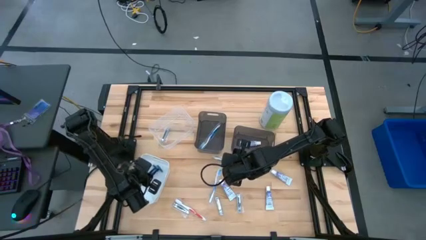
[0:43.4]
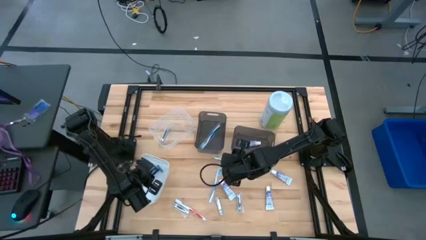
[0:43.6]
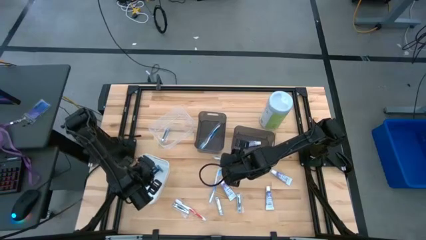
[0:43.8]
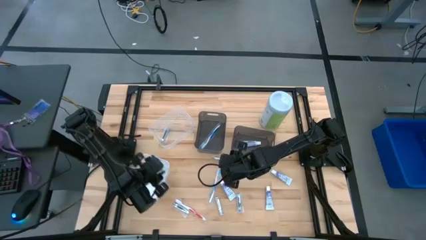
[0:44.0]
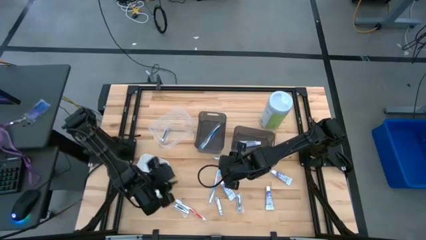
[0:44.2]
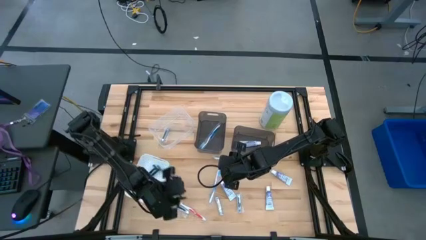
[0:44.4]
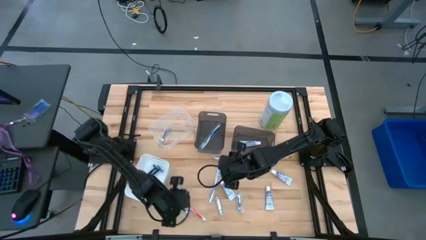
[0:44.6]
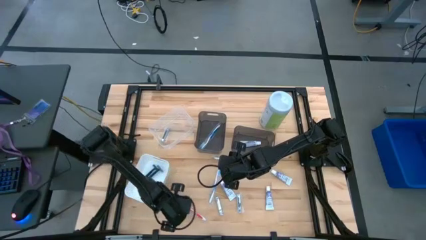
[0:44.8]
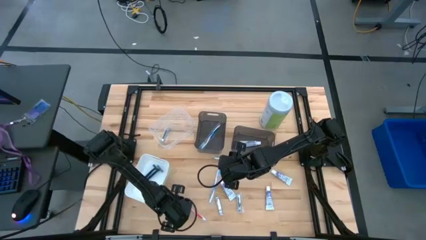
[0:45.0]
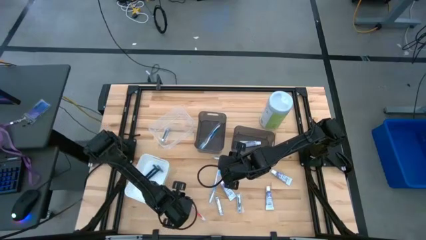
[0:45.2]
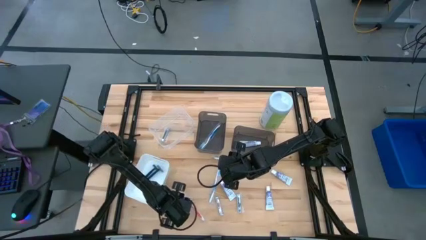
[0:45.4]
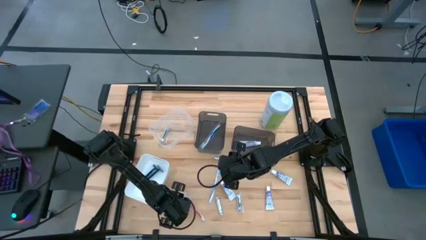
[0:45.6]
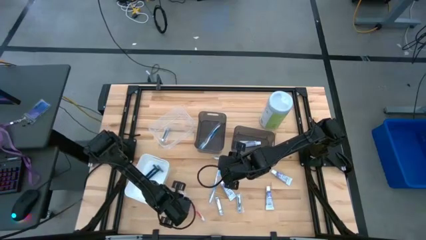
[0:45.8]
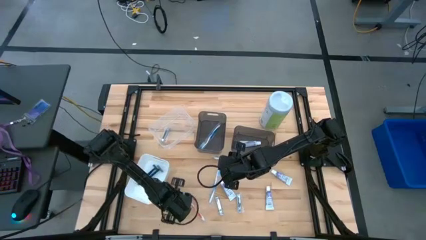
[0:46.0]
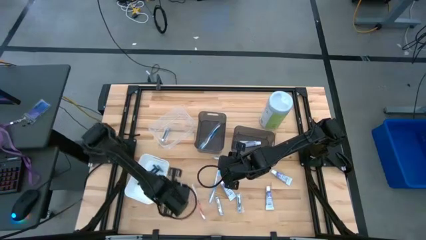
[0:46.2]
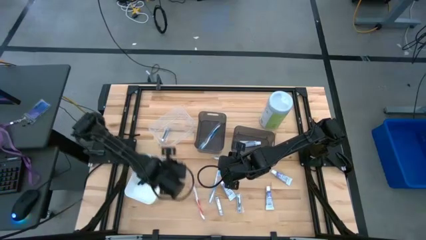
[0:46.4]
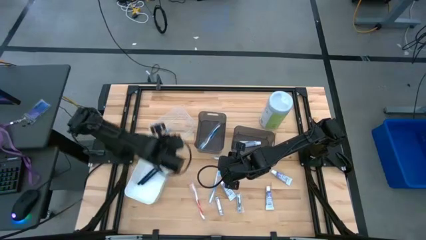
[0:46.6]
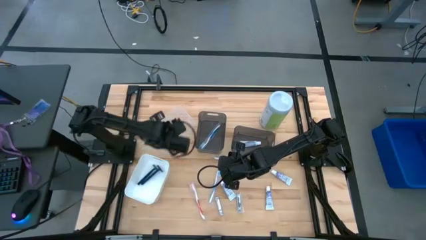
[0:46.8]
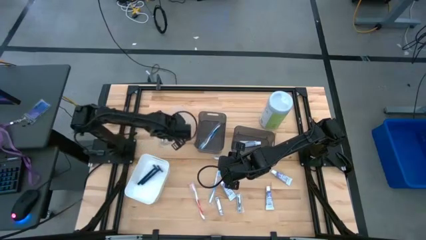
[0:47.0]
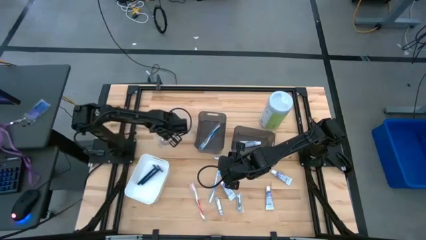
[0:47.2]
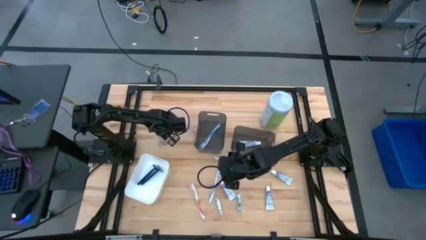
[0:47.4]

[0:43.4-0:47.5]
Task: Pick & Place Travel size toiletries
Put the silver nail cutter into the transparent bin

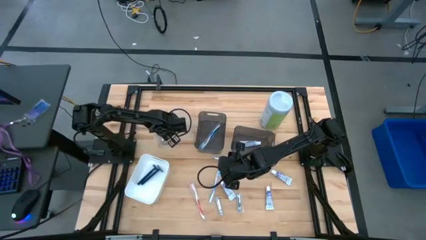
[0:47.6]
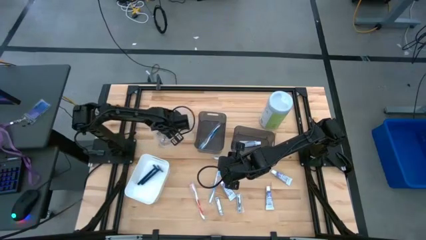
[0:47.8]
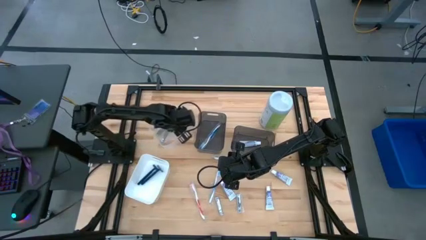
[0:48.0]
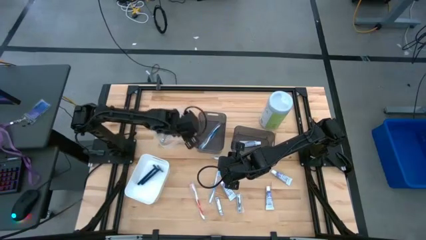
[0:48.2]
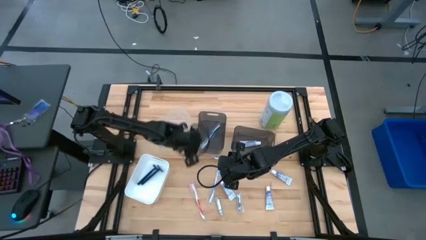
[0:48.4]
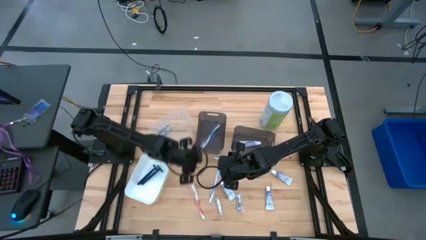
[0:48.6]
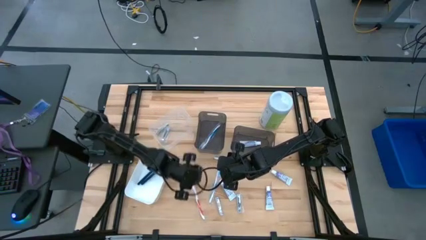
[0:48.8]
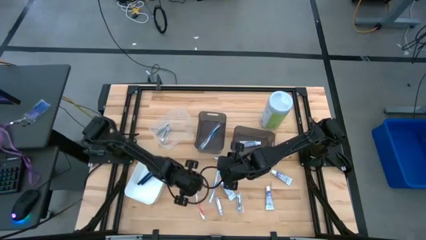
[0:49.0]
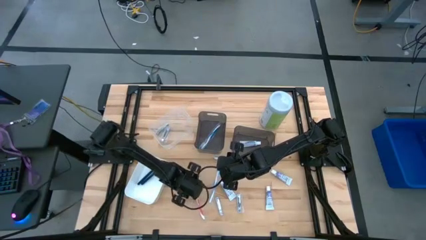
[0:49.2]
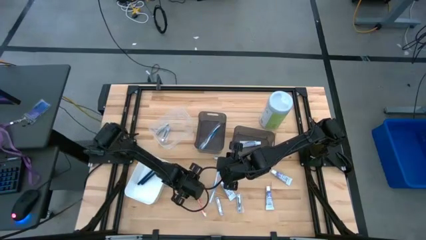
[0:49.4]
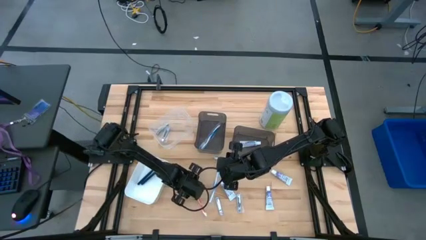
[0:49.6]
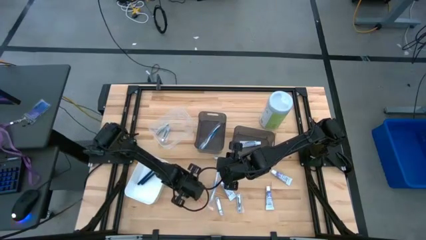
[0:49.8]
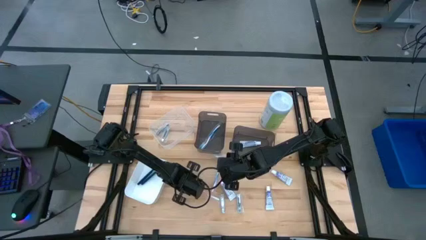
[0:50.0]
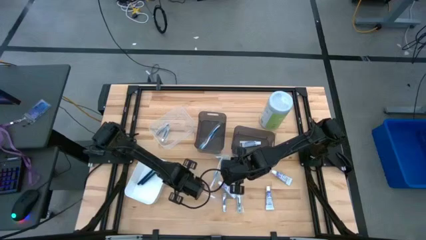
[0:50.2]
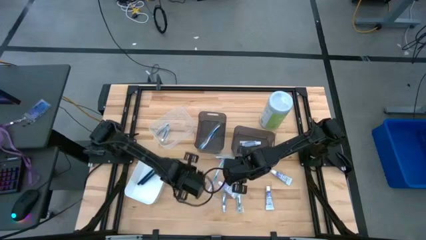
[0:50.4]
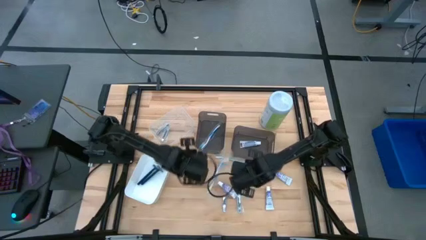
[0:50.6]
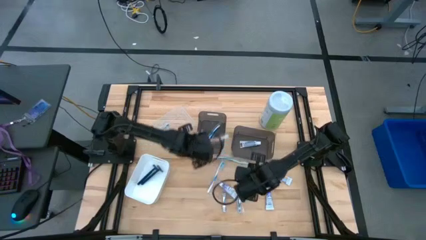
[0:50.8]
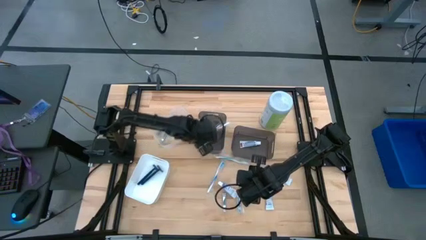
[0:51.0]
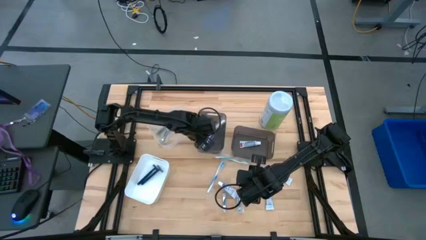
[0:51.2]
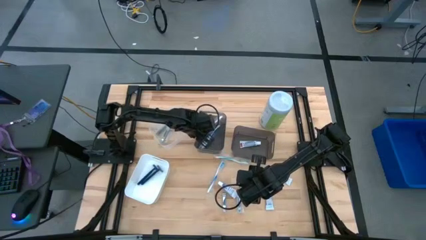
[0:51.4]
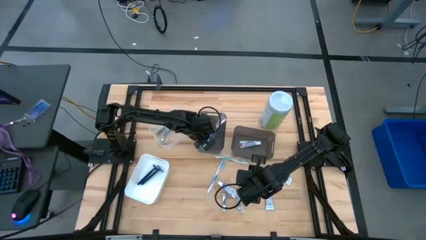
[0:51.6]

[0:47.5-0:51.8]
Put the orange toothbrush into the left black bin

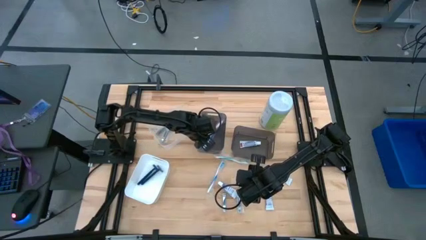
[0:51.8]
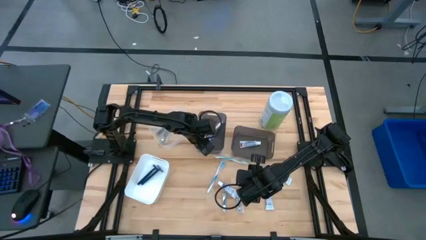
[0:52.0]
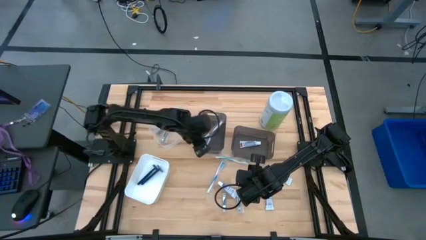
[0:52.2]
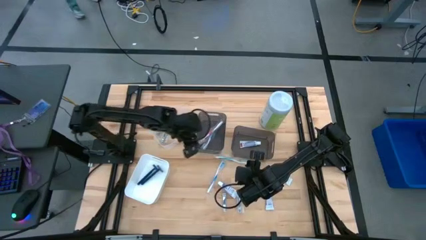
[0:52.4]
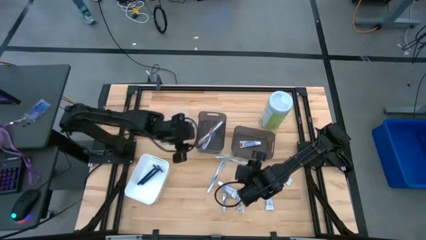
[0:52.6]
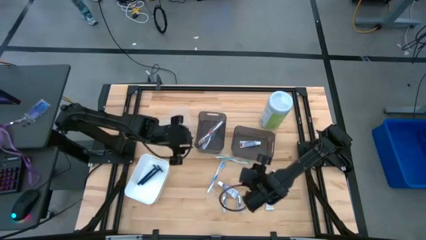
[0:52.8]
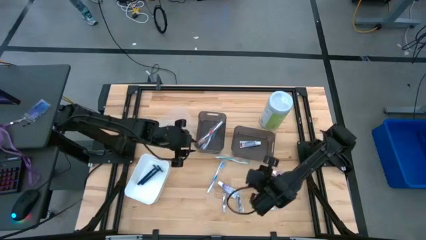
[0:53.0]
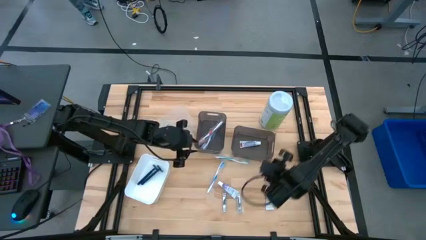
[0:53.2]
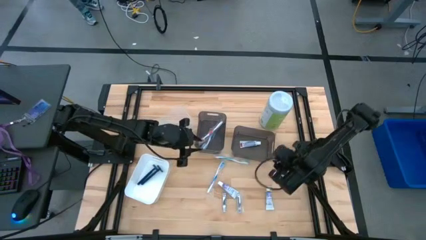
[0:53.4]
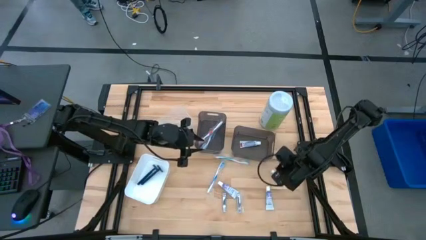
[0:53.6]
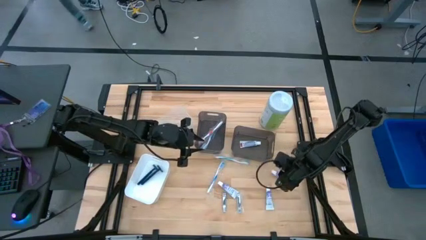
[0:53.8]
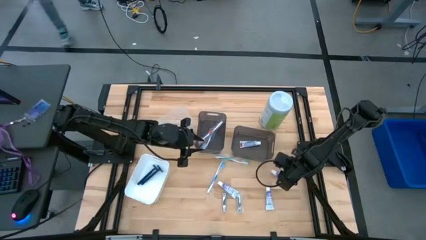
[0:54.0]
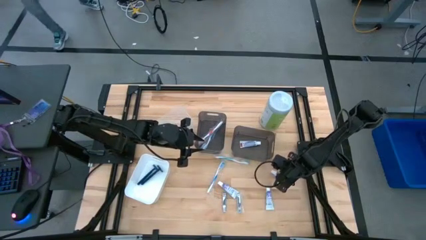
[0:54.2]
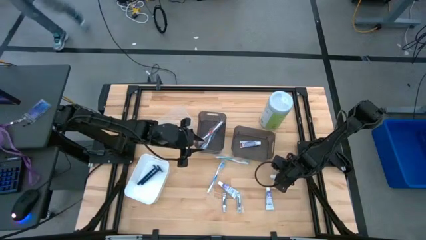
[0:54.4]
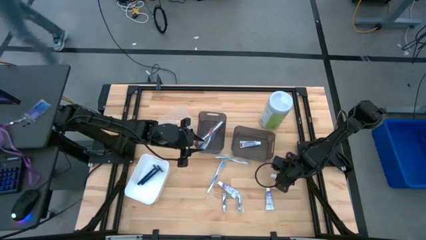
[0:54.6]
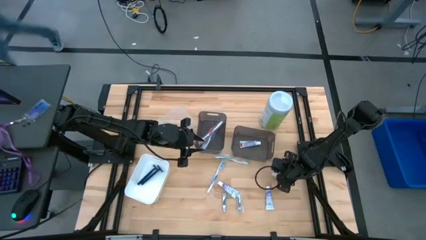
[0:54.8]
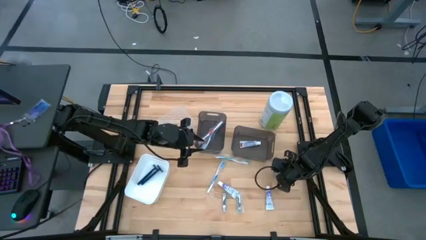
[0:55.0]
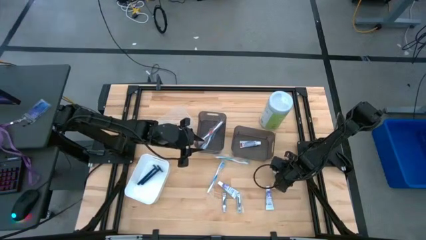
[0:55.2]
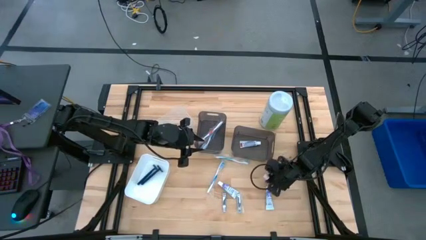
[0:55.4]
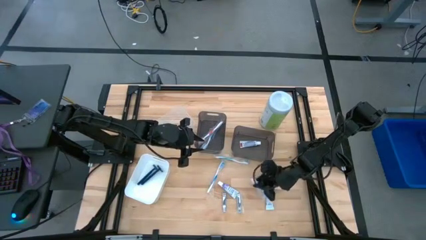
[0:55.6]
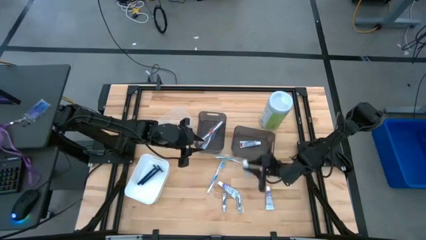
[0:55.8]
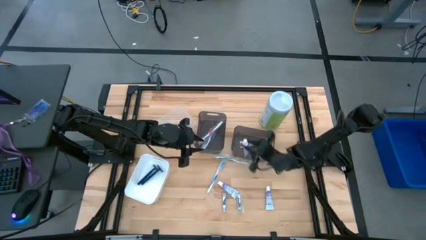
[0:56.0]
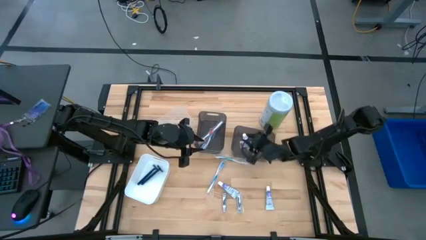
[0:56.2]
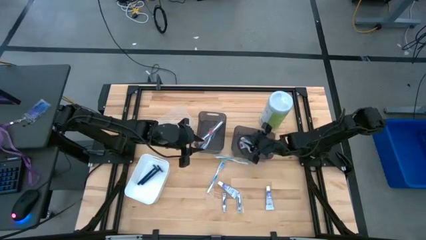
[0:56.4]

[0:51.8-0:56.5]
Put the white toothpaste into the right black bin

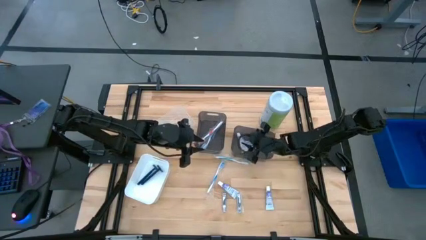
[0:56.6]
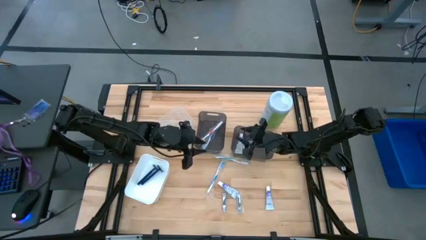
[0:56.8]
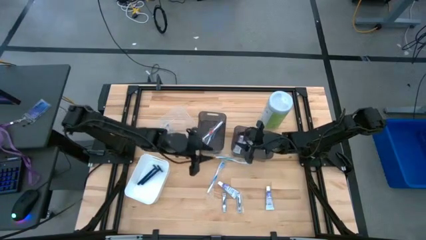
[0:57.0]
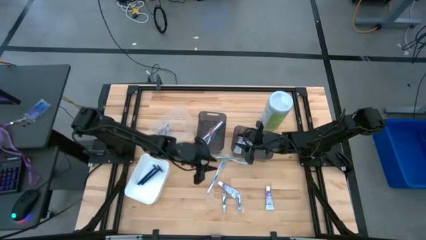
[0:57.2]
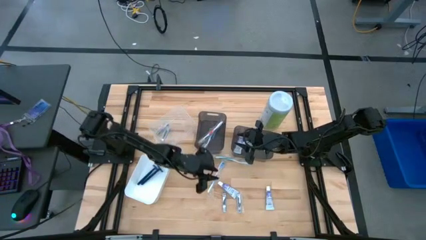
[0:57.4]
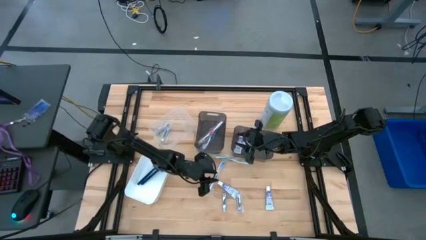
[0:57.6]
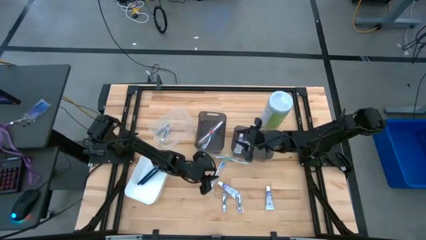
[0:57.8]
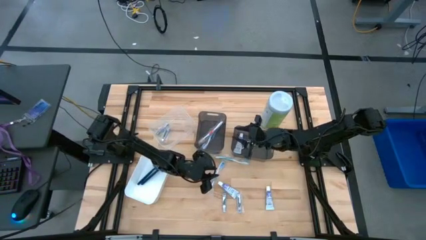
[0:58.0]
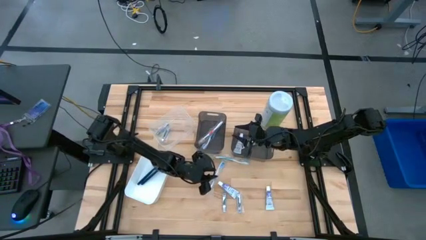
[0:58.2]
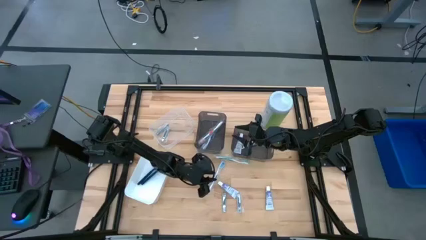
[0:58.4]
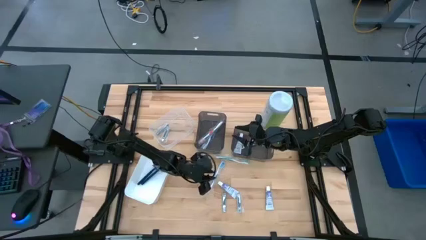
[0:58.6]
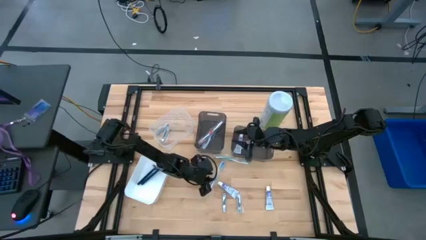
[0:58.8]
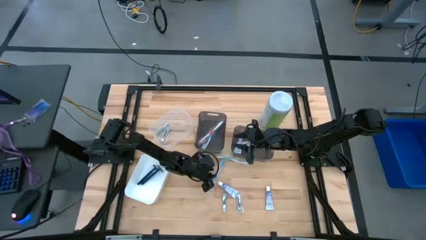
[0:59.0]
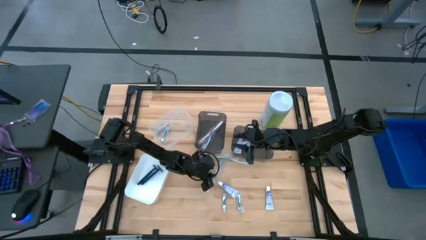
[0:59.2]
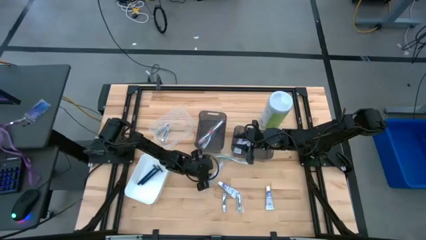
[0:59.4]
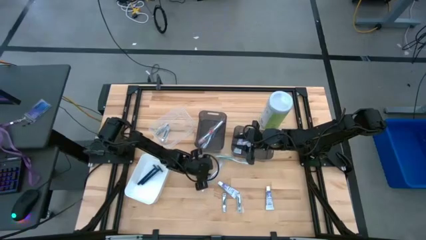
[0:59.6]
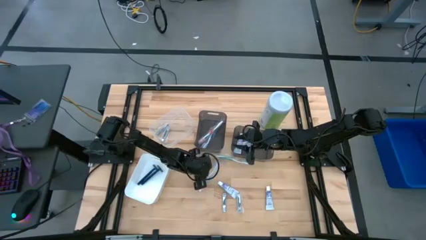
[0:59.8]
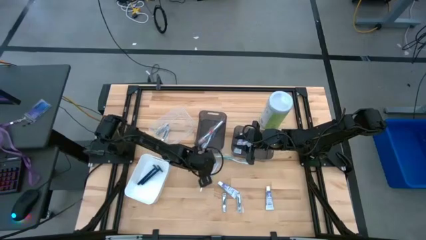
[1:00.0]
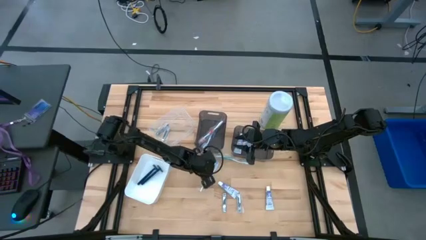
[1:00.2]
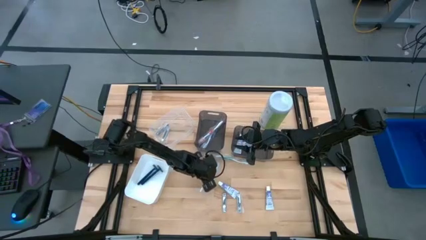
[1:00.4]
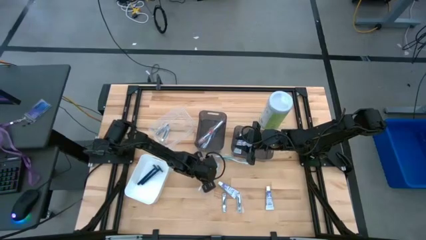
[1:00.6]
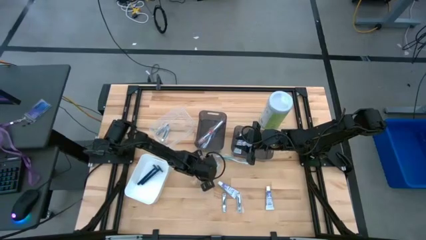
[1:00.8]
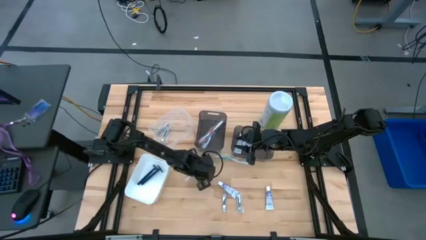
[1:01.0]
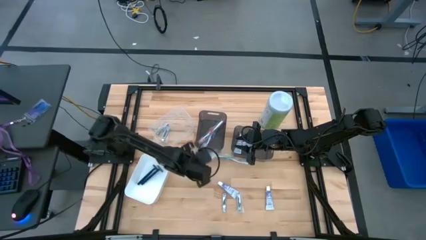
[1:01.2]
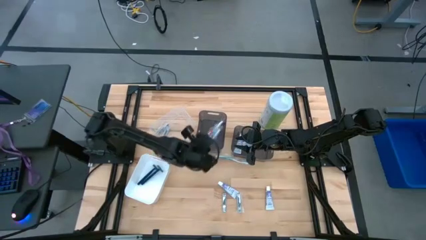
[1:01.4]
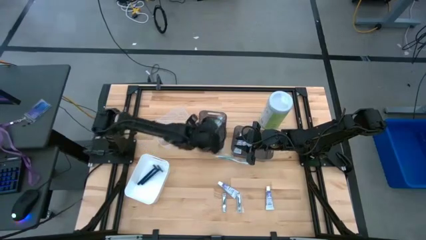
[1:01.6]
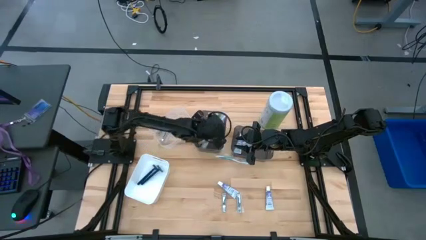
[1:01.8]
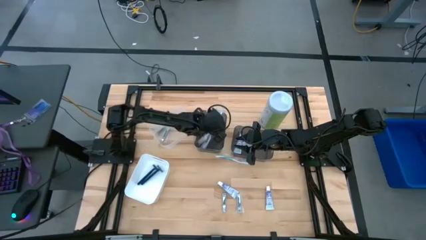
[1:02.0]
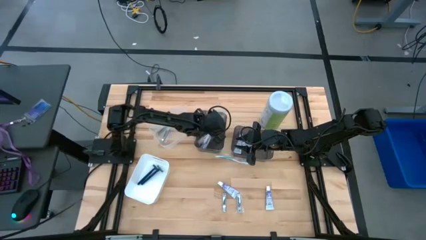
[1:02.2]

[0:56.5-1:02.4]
Put the blue toothbrush into the left black bin
